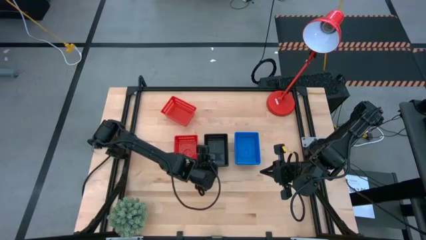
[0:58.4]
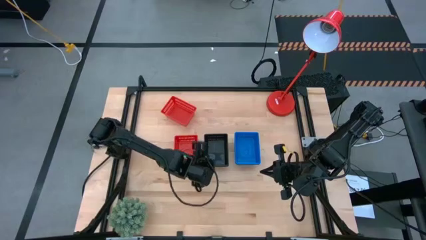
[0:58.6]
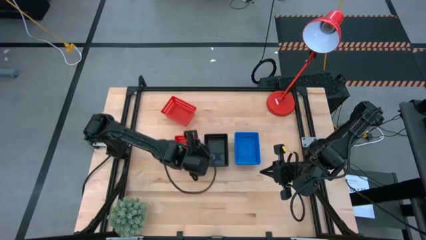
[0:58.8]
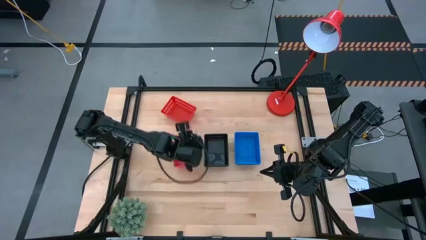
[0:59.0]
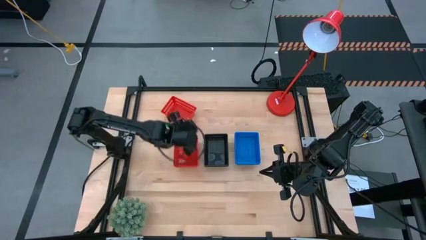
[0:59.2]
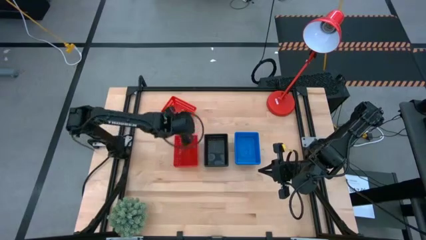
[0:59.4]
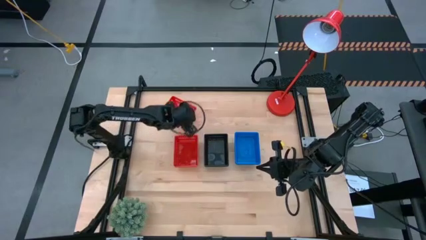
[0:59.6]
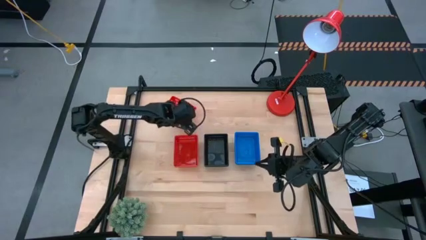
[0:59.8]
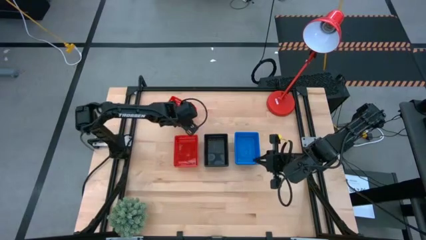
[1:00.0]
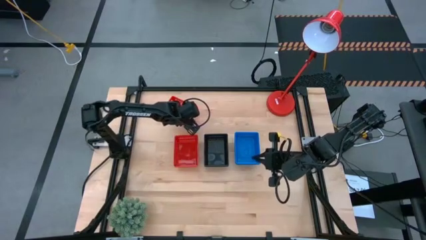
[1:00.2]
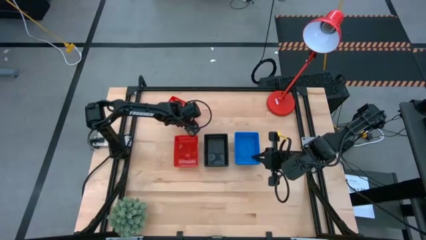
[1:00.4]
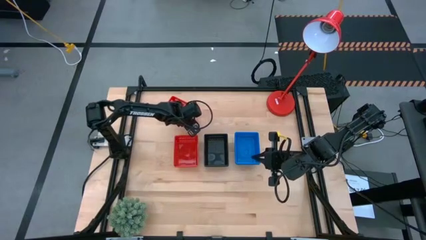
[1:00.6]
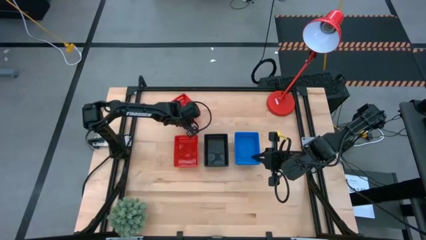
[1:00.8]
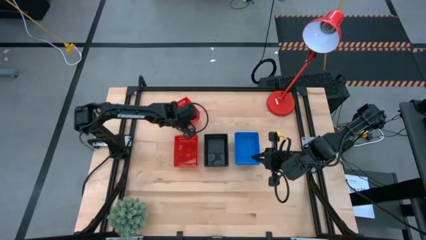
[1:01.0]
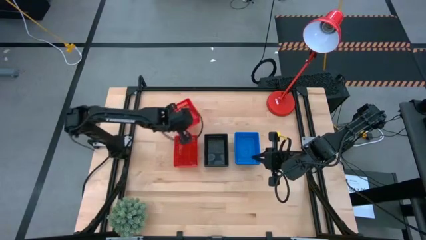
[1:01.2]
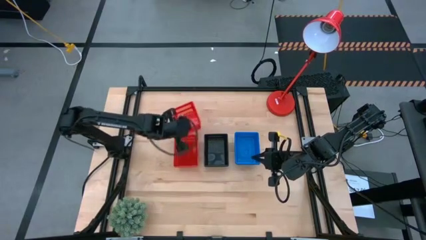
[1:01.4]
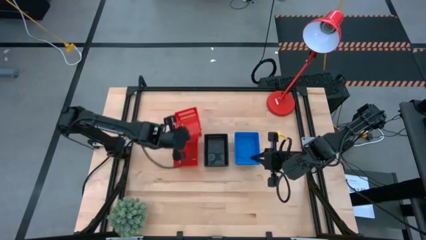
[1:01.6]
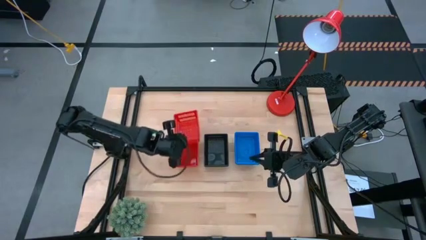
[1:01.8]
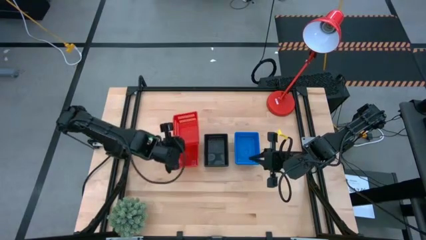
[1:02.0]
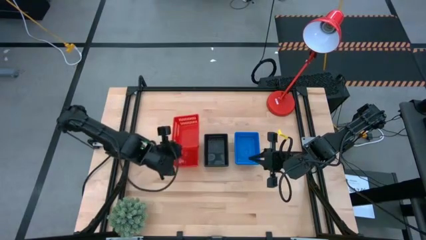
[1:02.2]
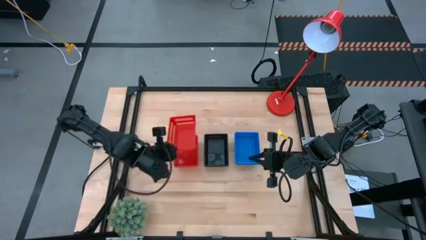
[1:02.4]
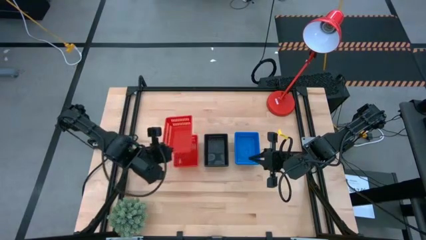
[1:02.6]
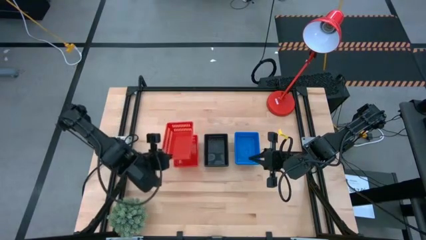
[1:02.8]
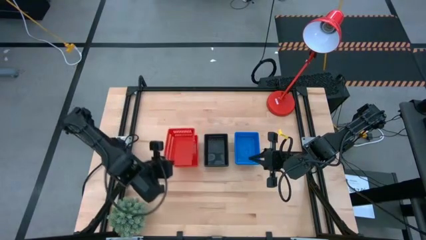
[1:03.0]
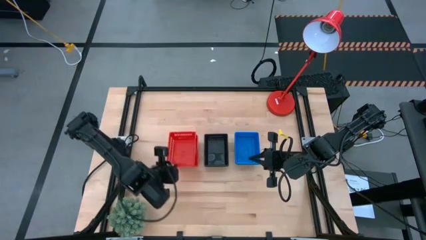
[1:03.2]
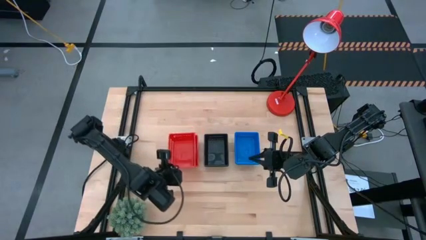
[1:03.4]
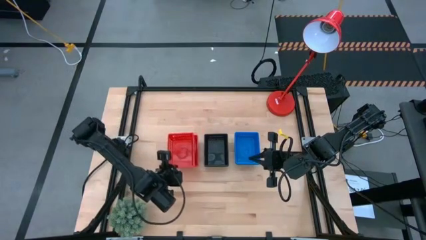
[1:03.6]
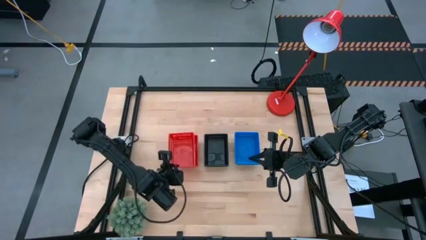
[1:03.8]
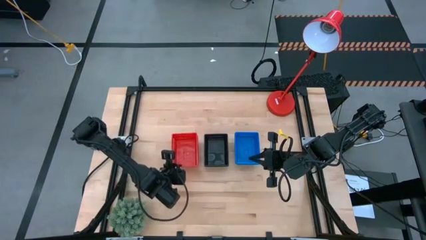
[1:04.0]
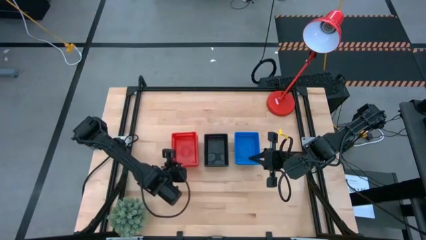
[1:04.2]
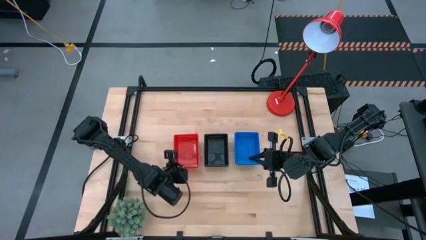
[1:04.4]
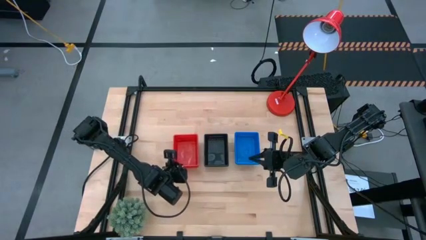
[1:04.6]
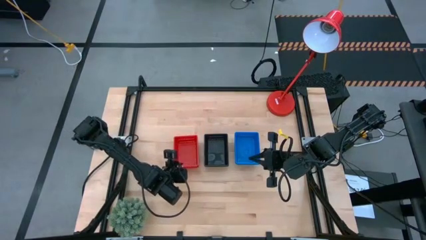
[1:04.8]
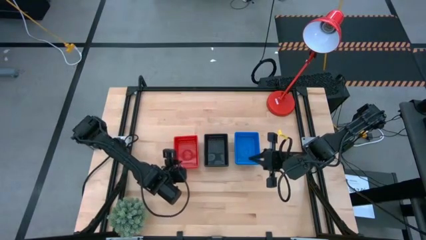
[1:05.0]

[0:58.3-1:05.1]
Stack the top red bin on the bottom stacked red bins
